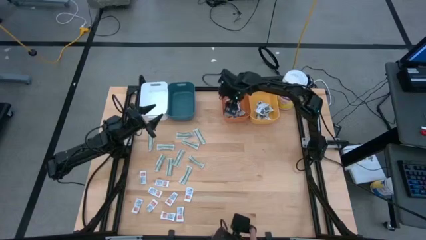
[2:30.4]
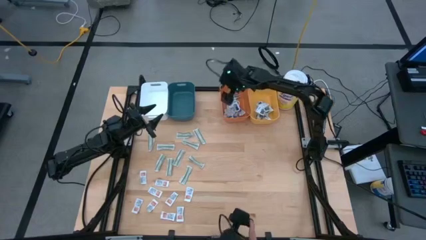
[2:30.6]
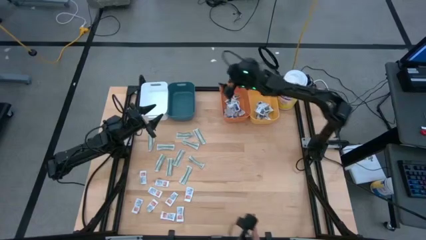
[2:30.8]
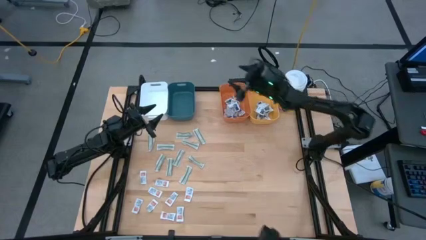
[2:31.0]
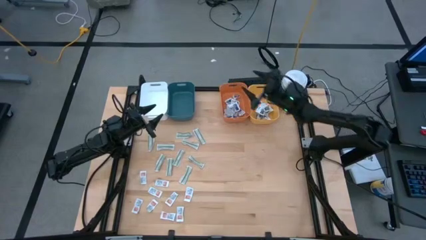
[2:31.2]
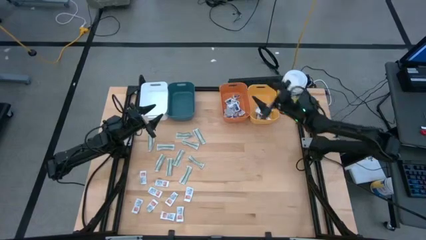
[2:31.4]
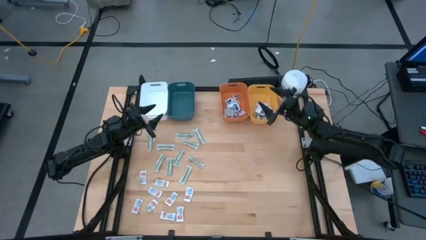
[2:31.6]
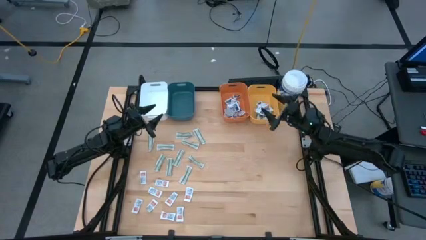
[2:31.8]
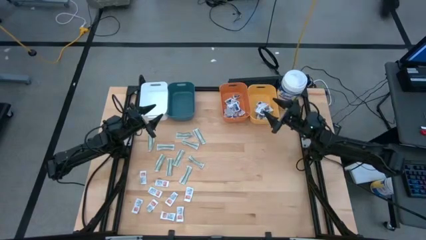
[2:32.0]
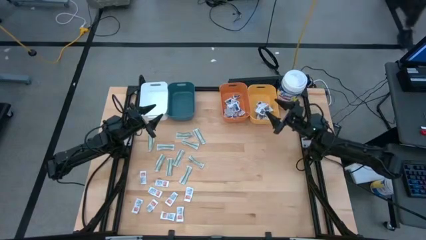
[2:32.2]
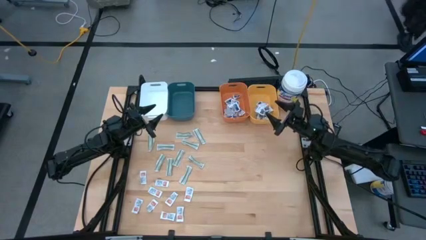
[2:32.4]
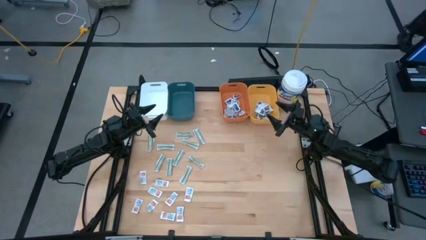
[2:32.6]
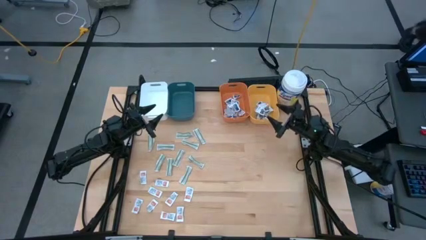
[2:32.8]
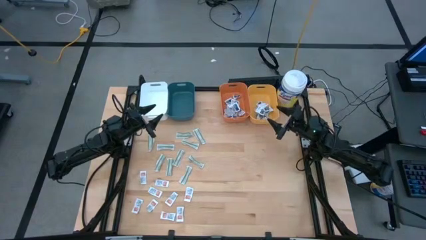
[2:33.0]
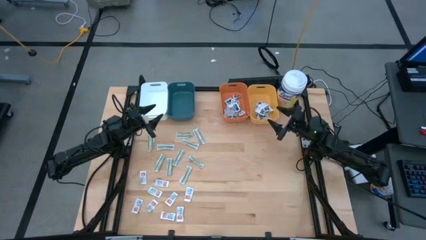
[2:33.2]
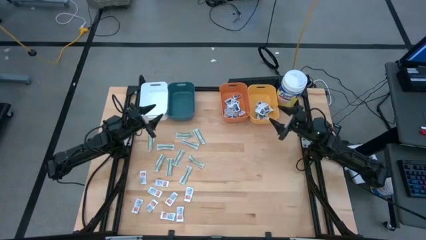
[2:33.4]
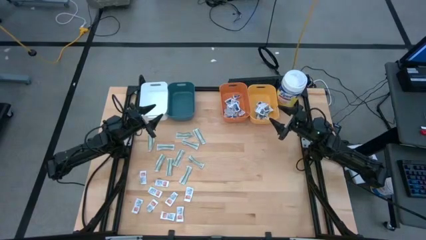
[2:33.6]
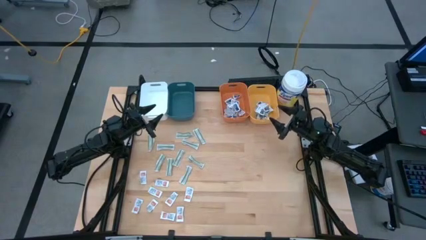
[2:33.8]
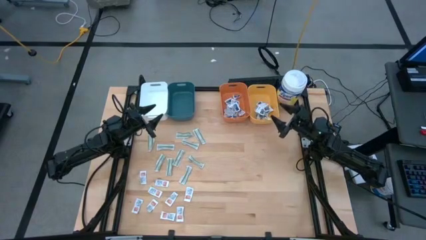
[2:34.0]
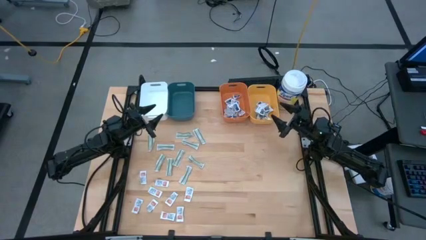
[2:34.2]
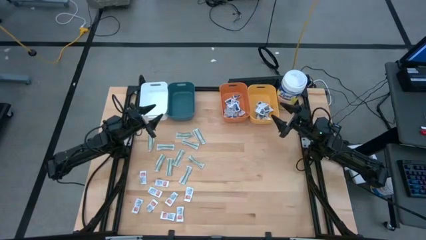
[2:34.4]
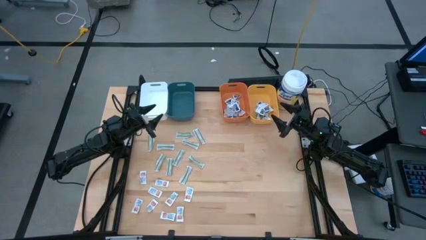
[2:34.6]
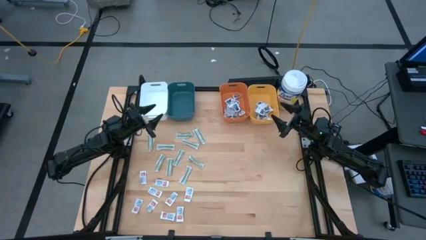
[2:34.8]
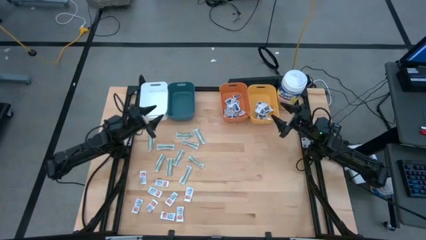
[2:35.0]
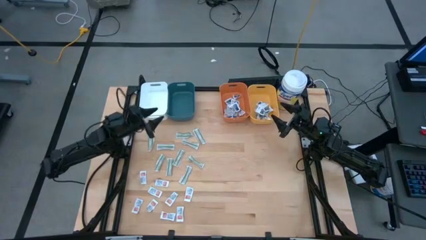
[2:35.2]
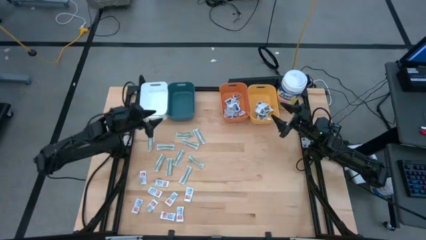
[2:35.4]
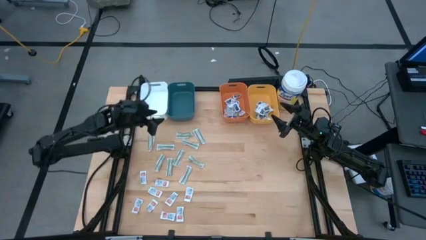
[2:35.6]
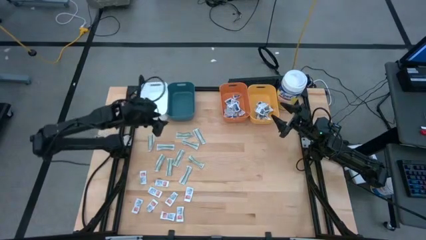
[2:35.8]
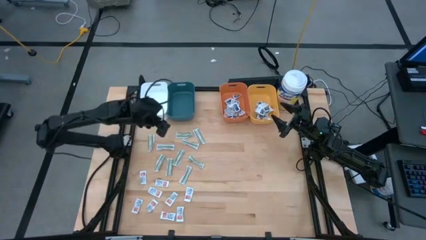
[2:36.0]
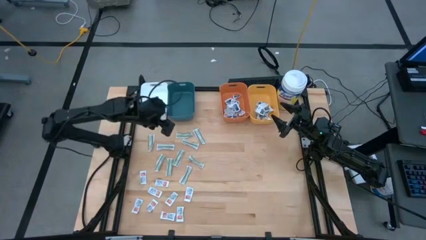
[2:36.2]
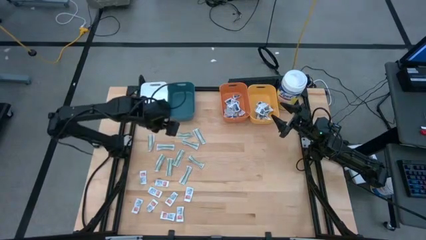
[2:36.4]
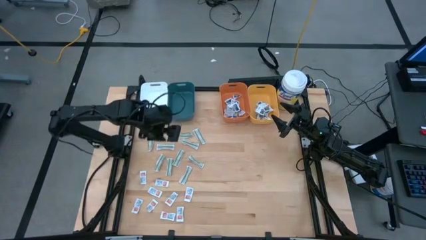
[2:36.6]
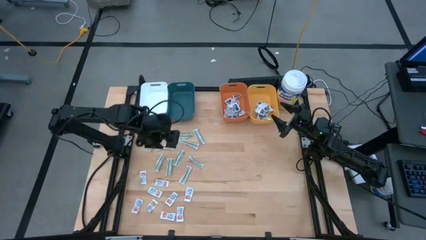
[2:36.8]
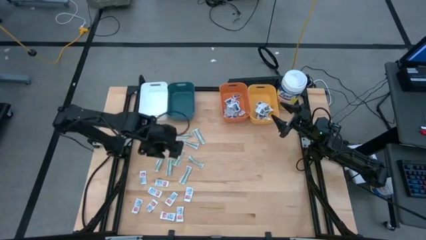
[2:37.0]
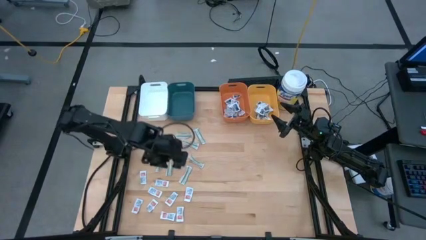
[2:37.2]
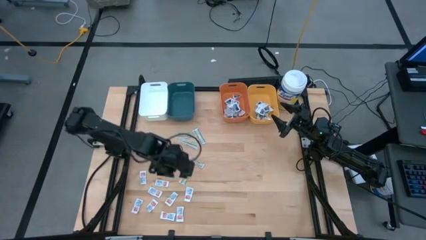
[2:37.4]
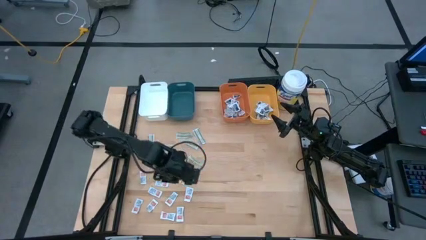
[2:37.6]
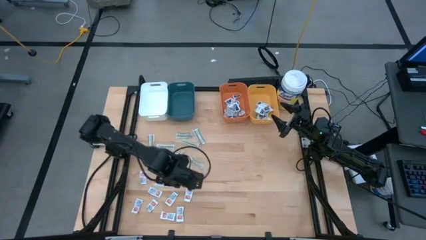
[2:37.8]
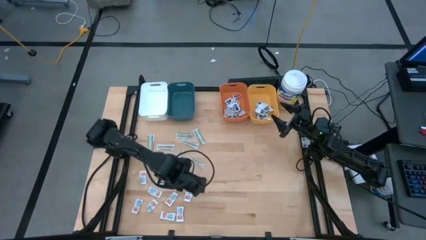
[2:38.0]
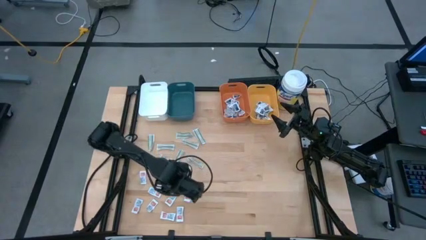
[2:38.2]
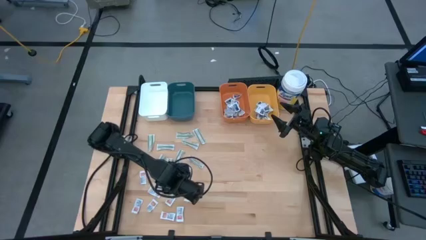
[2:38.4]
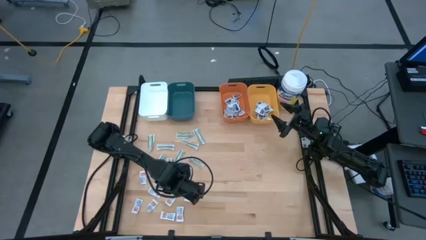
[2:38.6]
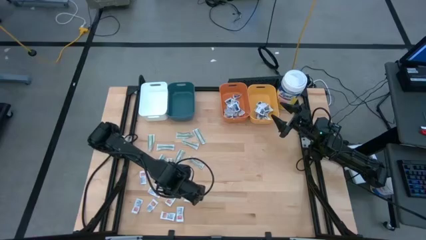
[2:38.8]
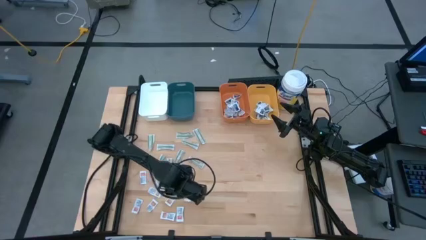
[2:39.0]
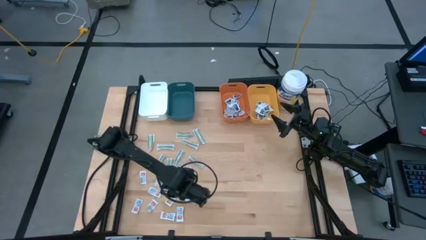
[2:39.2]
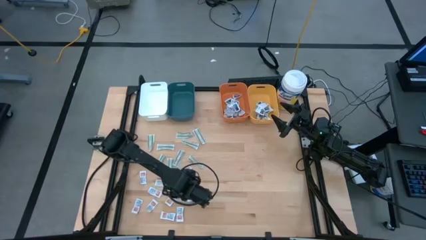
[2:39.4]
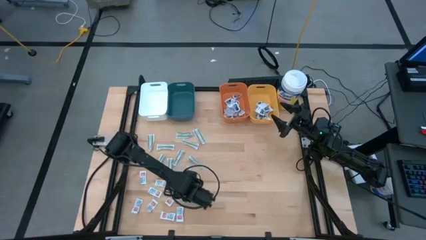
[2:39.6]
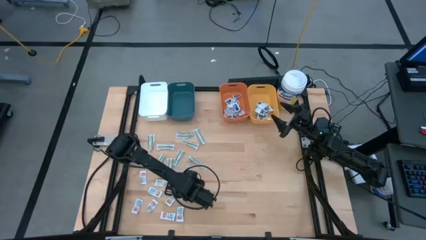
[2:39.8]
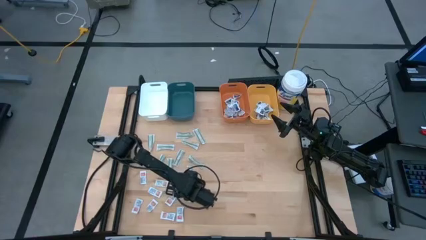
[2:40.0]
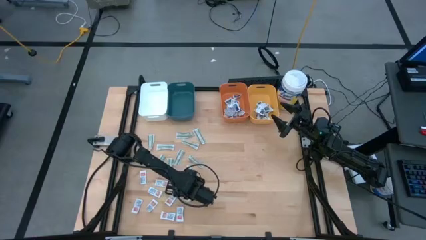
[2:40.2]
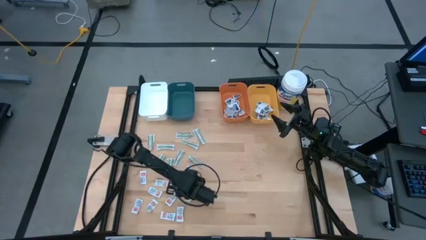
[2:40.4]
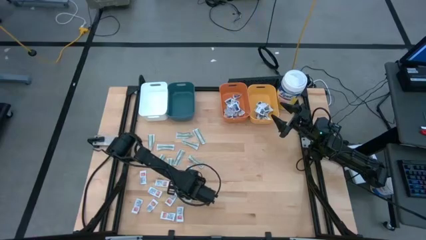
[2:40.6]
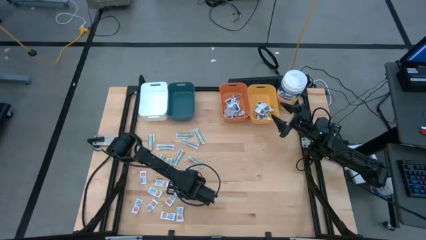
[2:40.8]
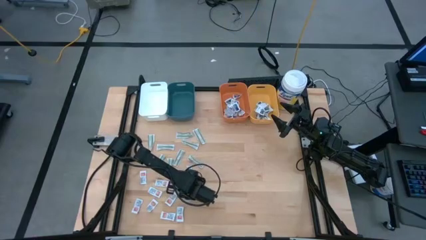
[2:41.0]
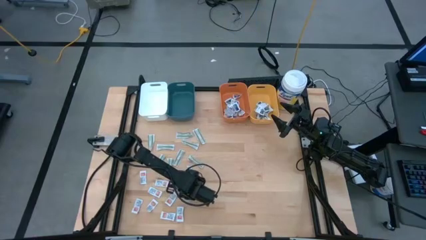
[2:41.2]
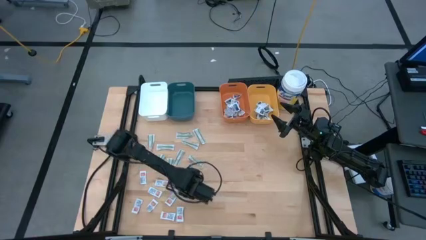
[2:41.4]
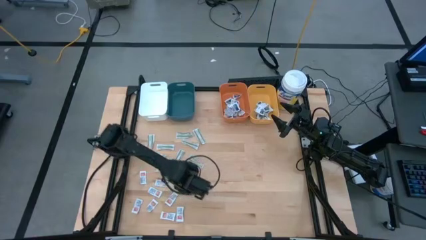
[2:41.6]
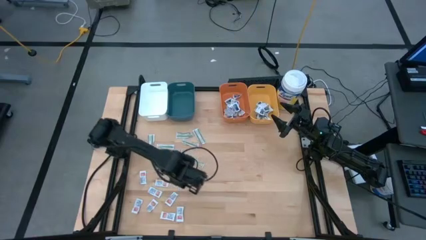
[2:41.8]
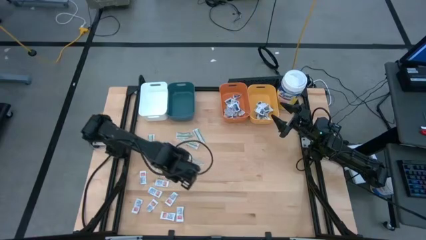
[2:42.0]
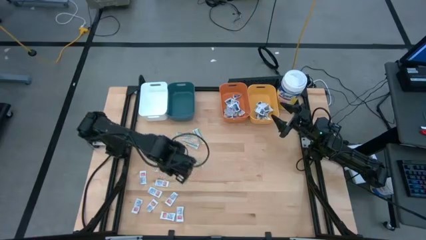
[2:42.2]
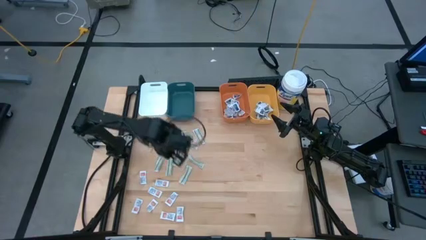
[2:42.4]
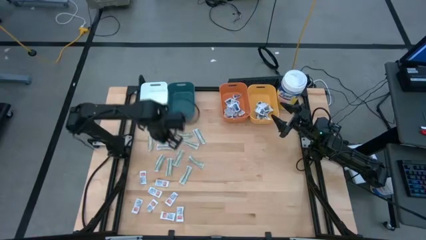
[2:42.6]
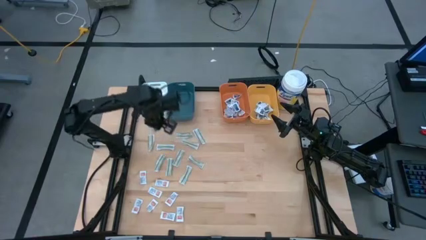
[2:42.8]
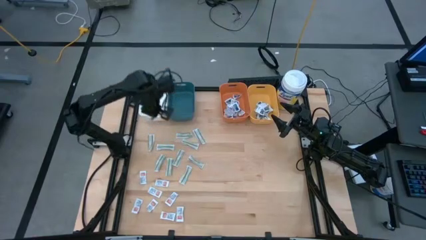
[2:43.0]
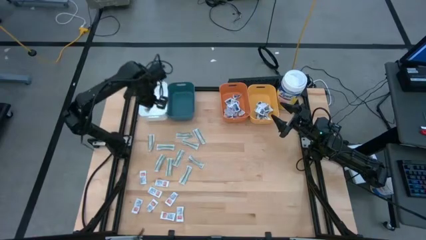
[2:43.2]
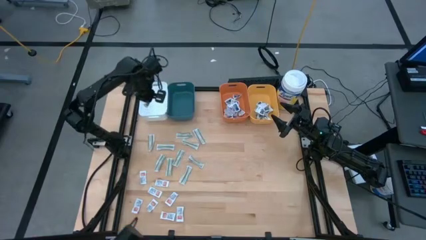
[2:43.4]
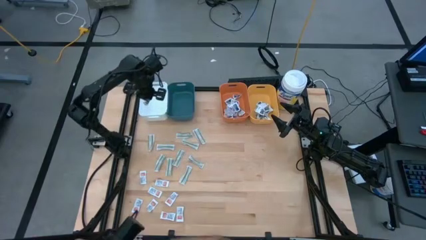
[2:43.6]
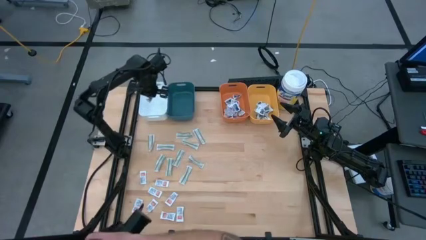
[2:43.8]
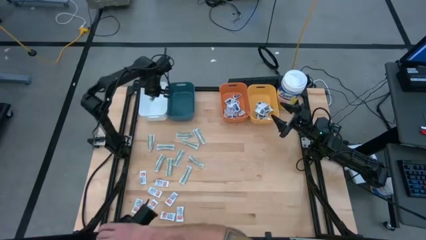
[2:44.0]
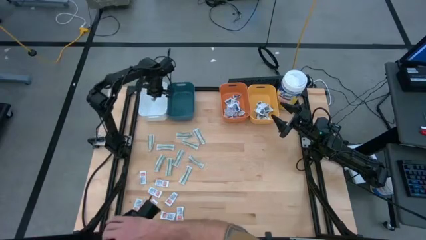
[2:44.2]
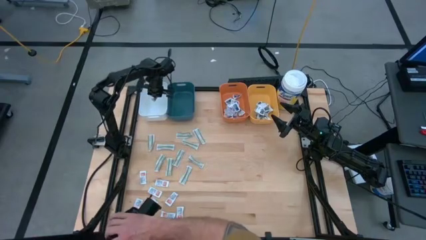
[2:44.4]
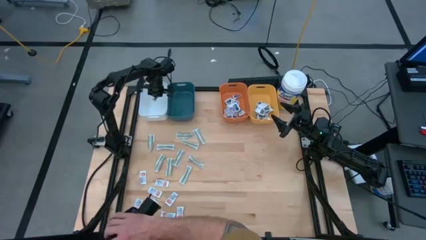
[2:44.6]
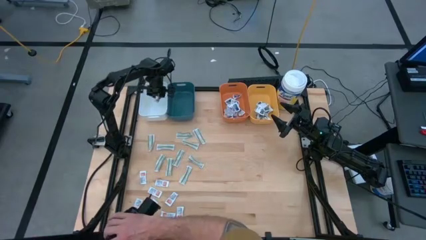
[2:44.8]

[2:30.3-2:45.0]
Task: Pick & Place First Aid Supplies
Put the ointment pack into the white bin
